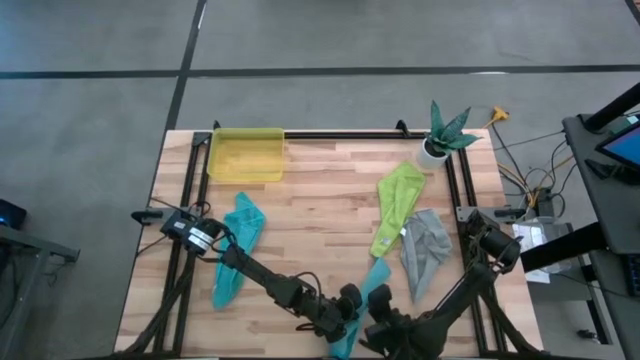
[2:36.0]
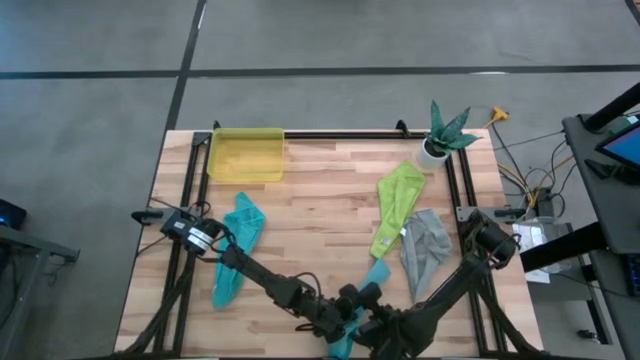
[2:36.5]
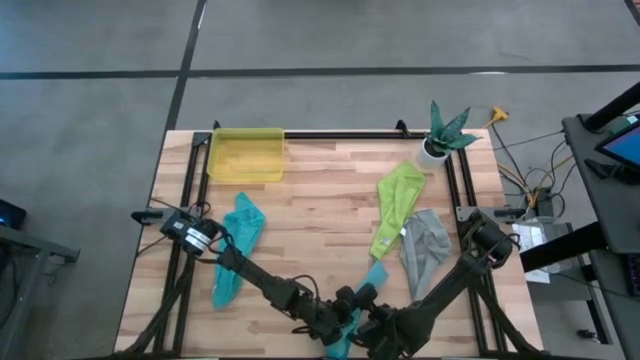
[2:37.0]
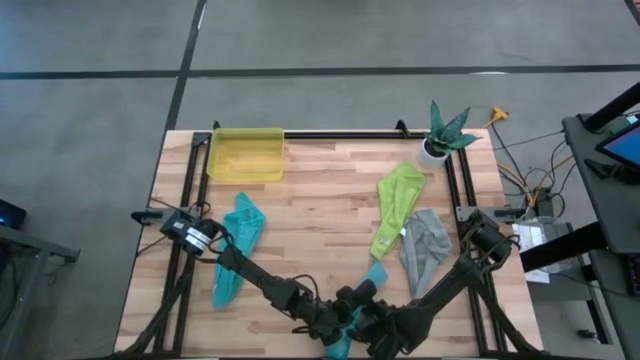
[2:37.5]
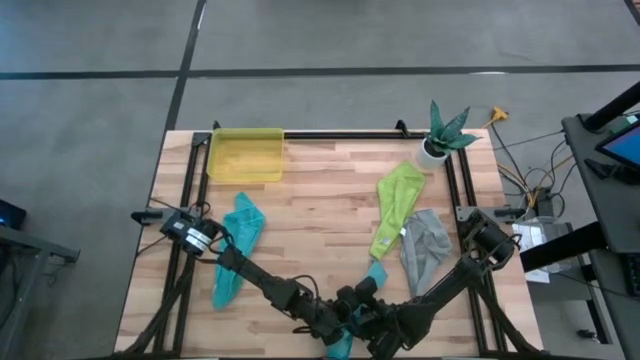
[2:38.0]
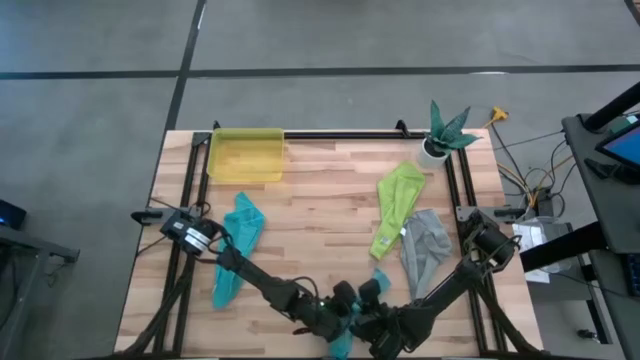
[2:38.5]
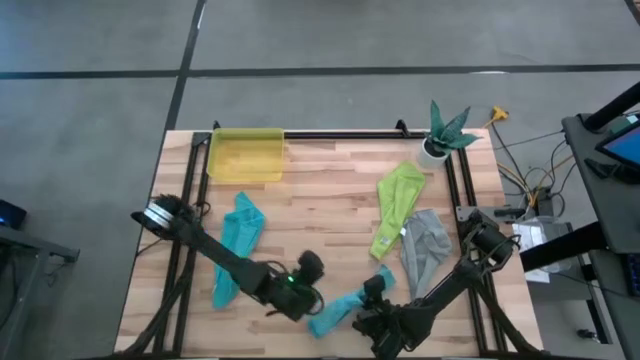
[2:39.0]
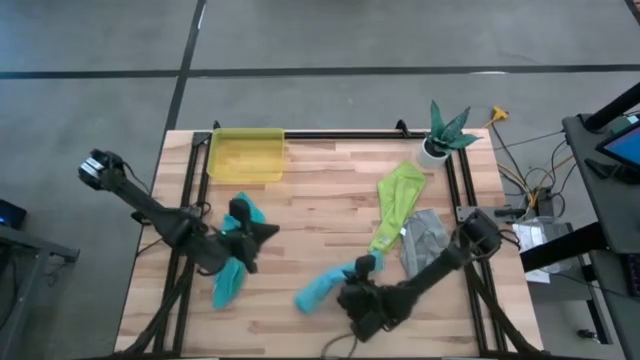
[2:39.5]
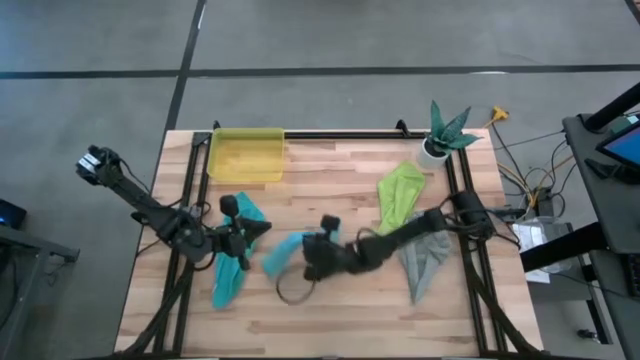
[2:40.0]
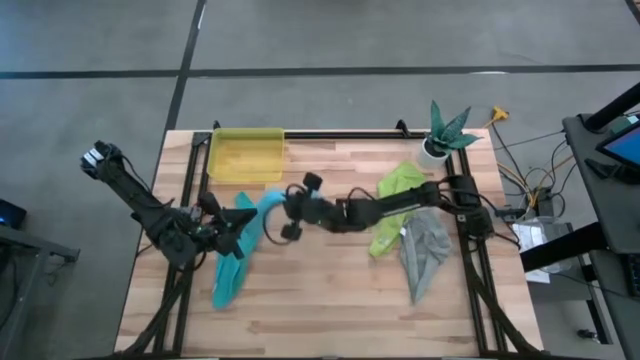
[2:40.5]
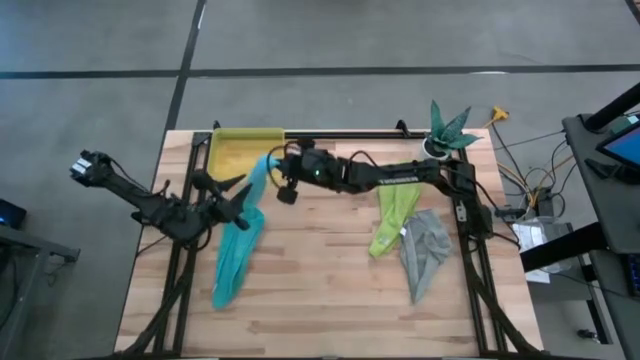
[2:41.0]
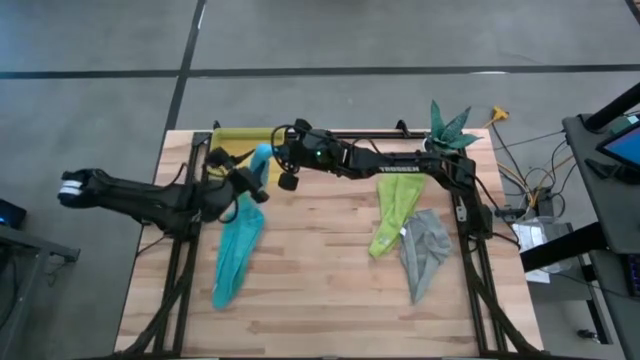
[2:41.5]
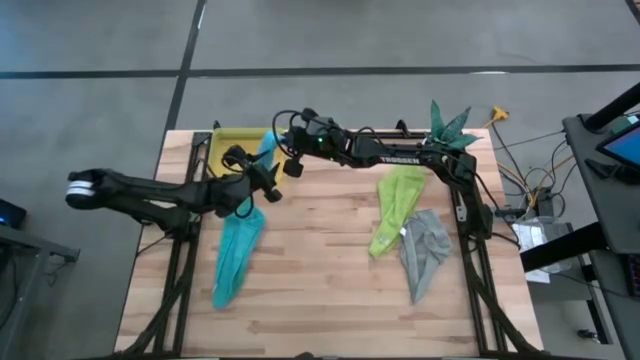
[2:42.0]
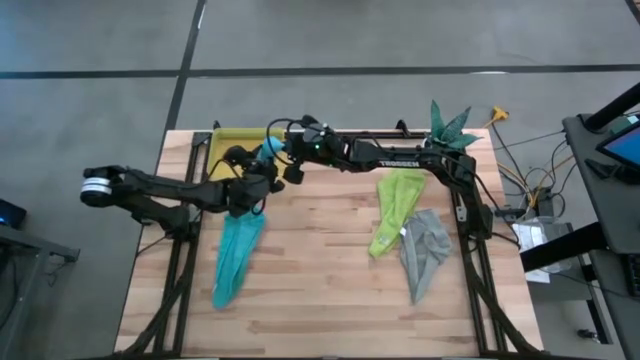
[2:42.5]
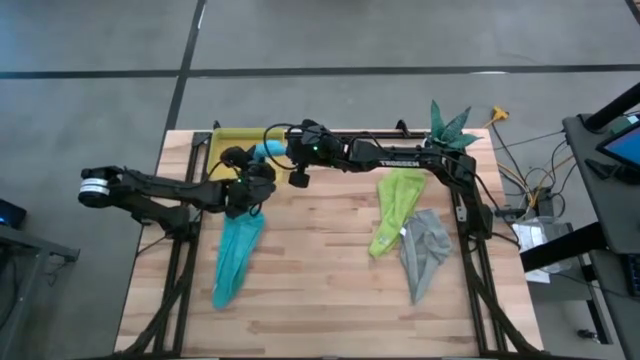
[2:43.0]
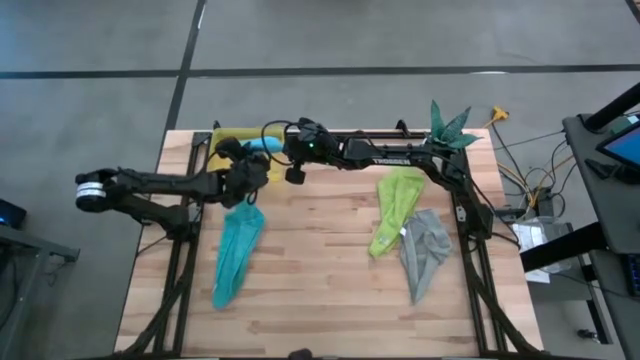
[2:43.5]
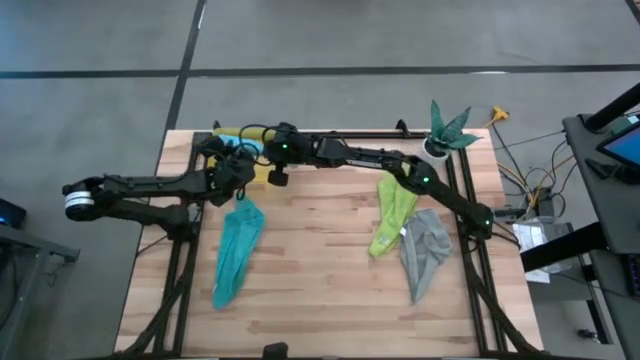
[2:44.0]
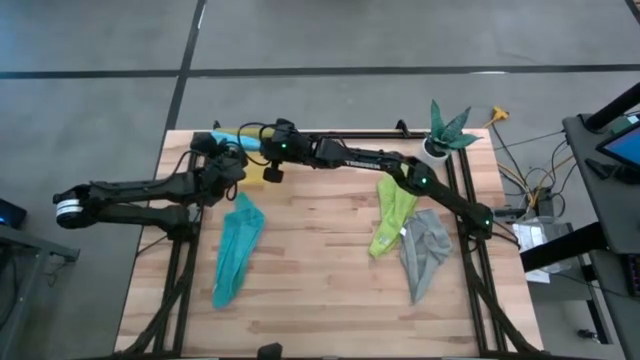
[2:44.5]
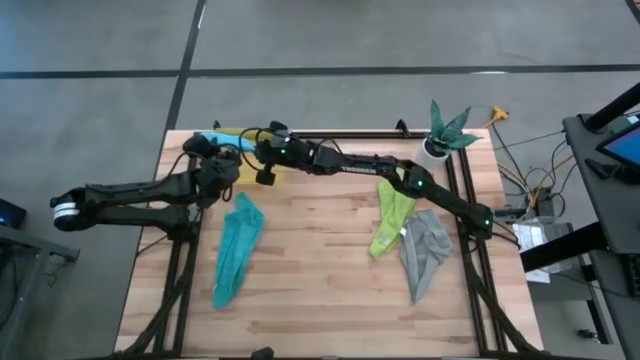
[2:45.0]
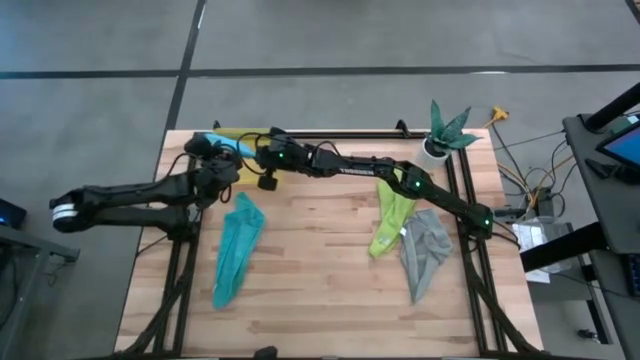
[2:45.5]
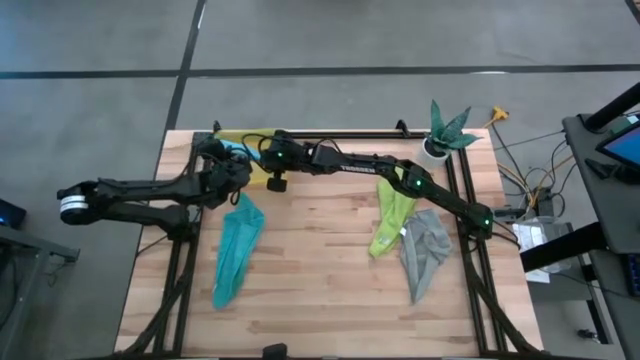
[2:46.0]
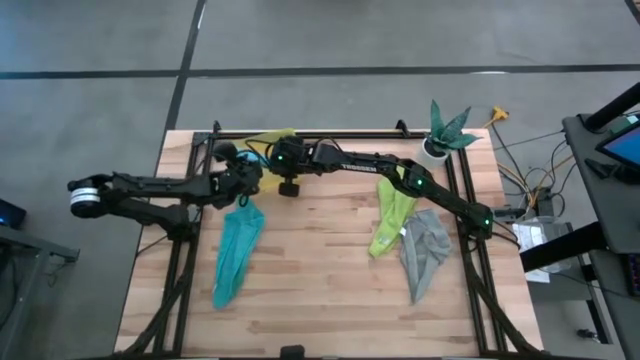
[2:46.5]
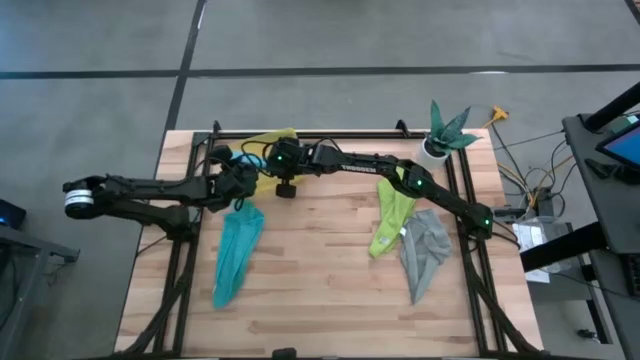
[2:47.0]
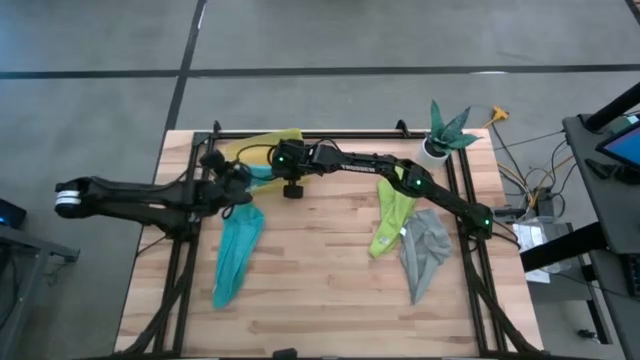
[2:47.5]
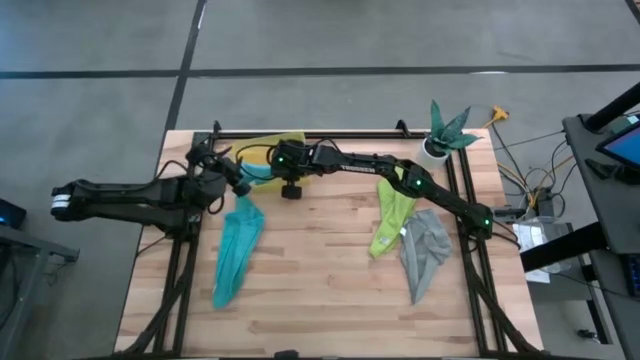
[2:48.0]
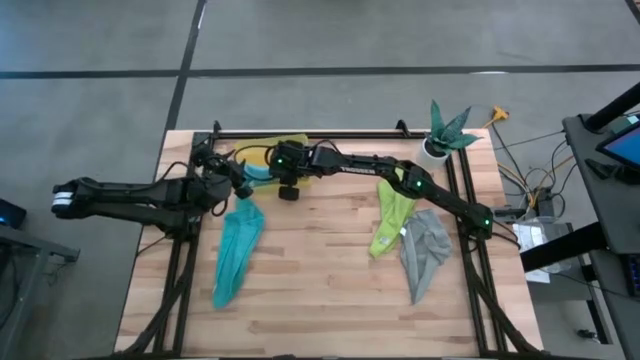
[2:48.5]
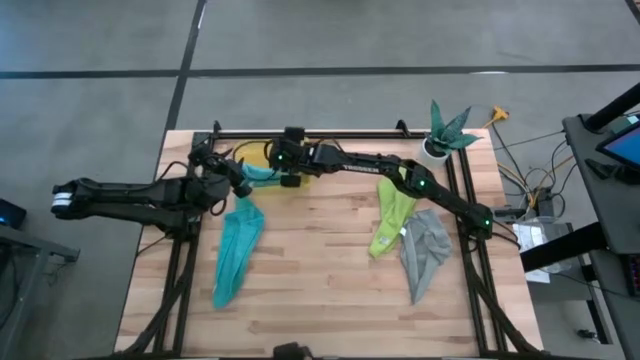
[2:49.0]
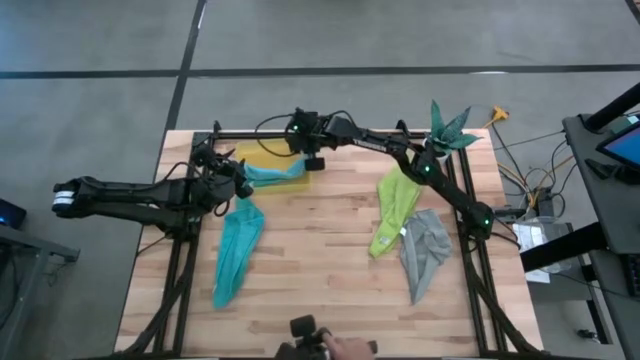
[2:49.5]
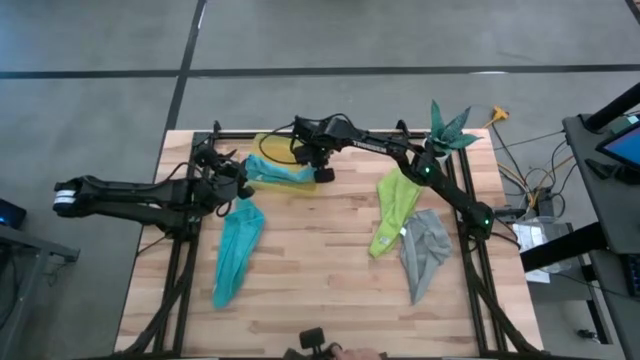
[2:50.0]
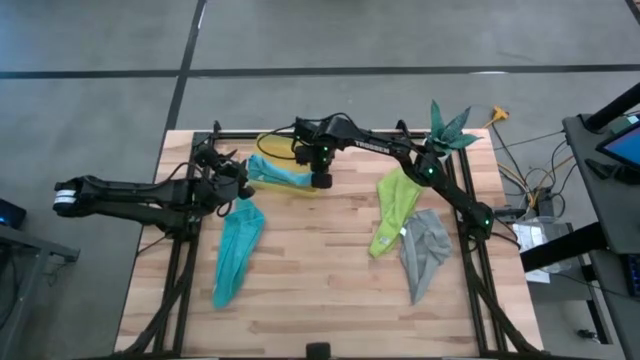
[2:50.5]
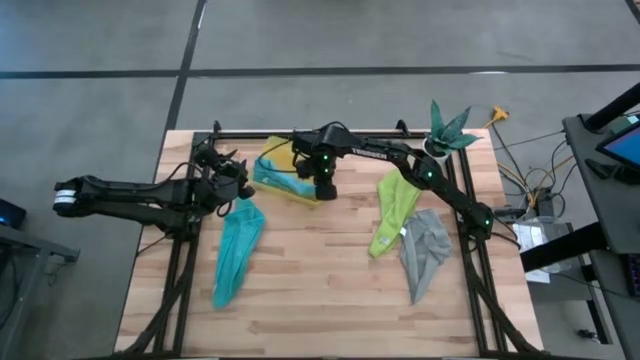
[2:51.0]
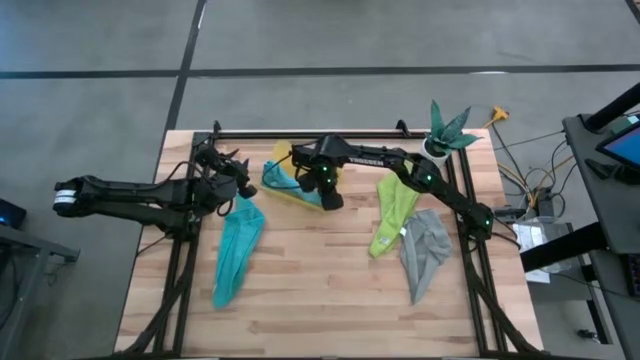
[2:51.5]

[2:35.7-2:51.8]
Task: Roll microfiber towels into tight, uniform cylinder then place into a basket
Put the rolled right light blue towel into the yellow bin

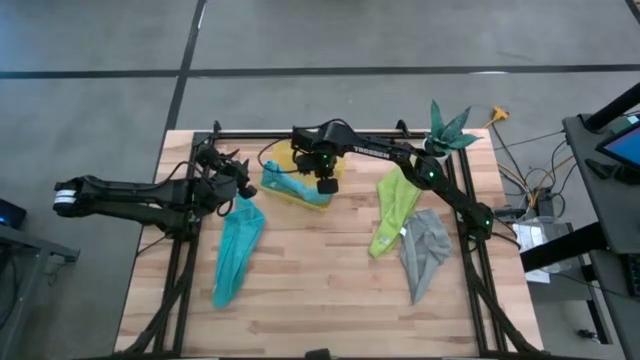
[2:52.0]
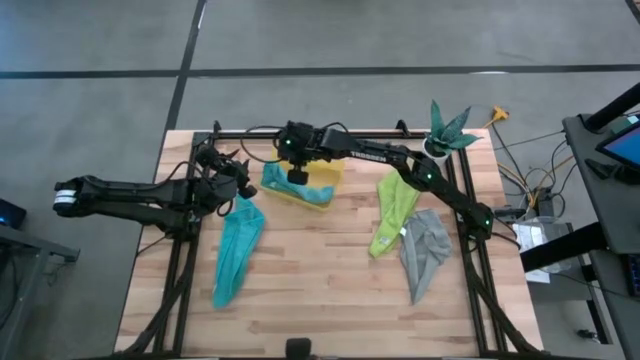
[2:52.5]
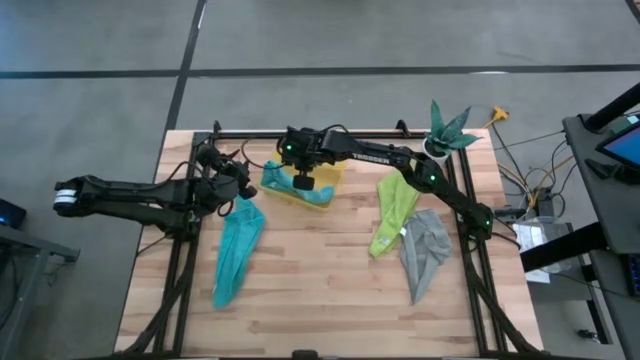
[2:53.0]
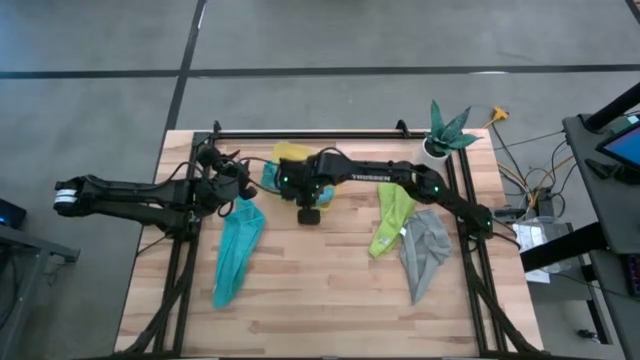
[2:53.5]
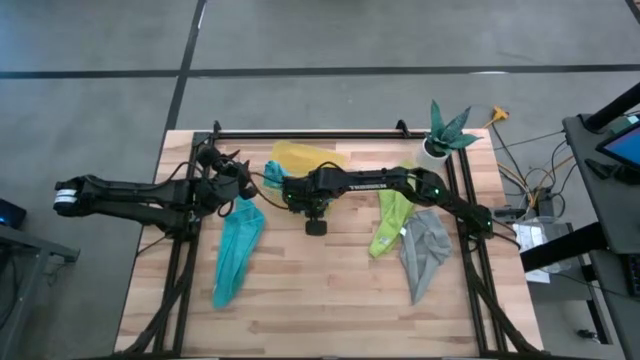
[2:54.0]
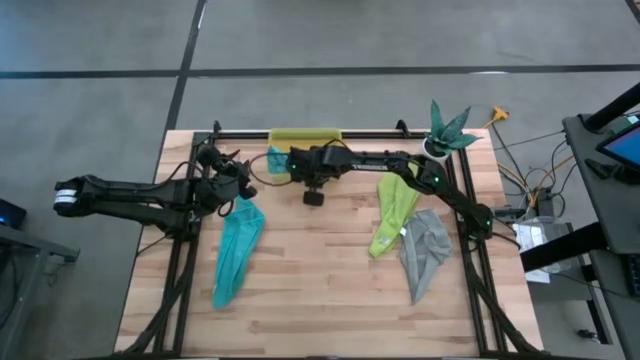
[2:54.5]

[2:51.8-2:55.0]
Adjust the yellow bin on the table
